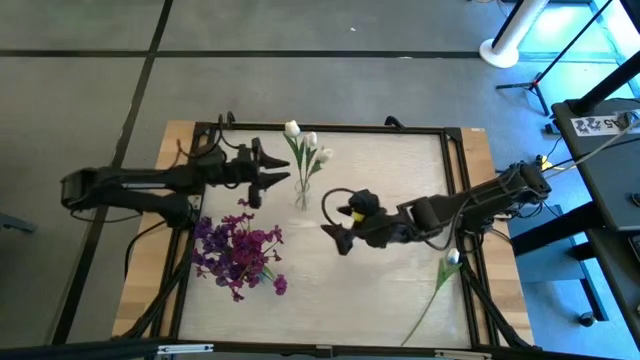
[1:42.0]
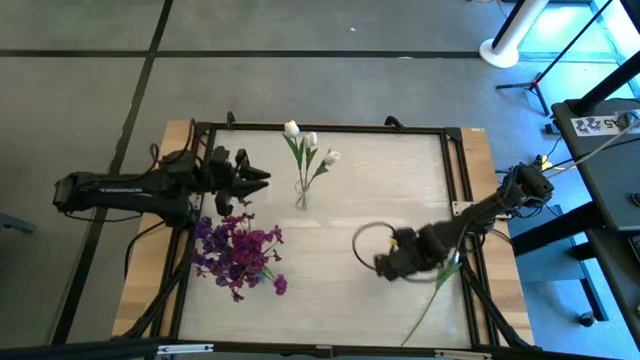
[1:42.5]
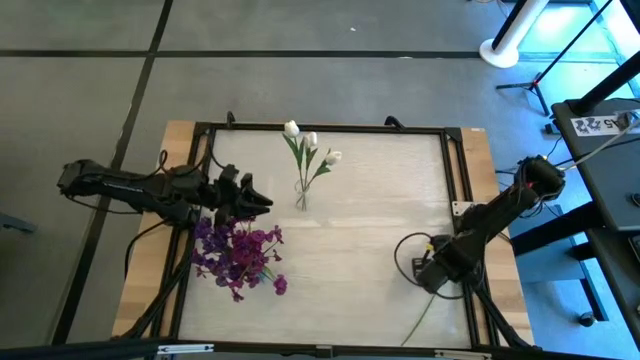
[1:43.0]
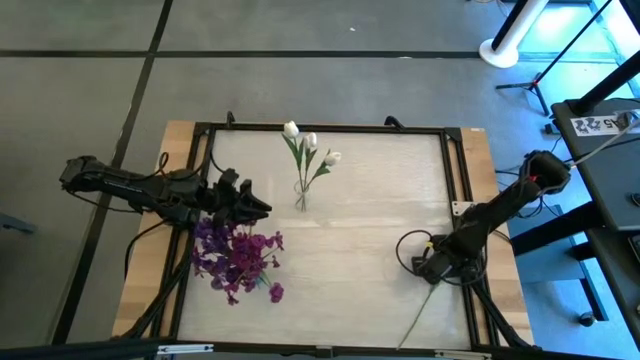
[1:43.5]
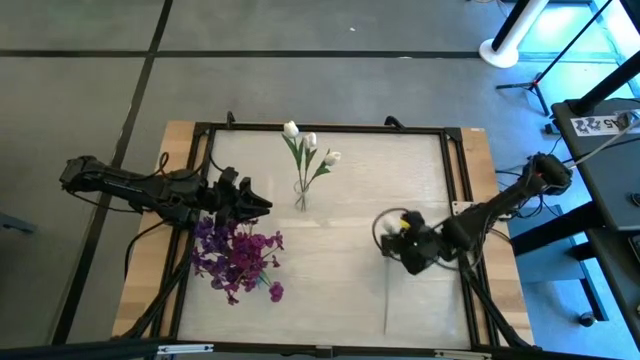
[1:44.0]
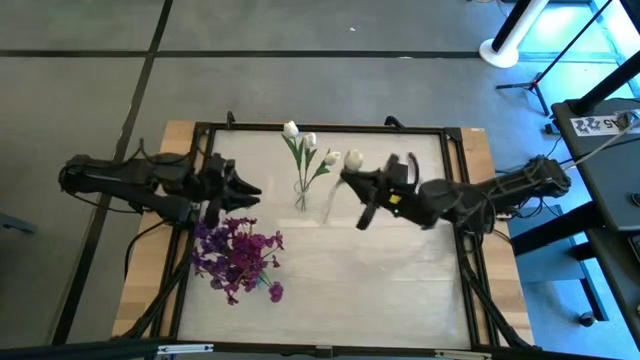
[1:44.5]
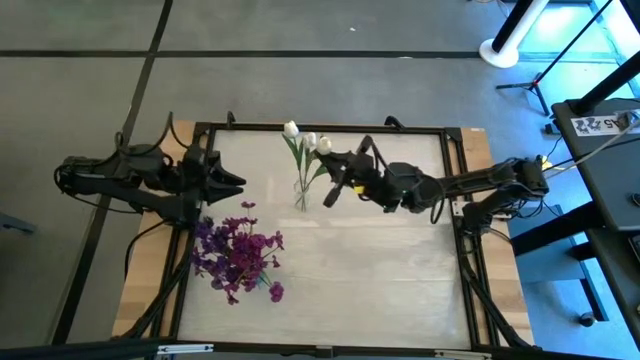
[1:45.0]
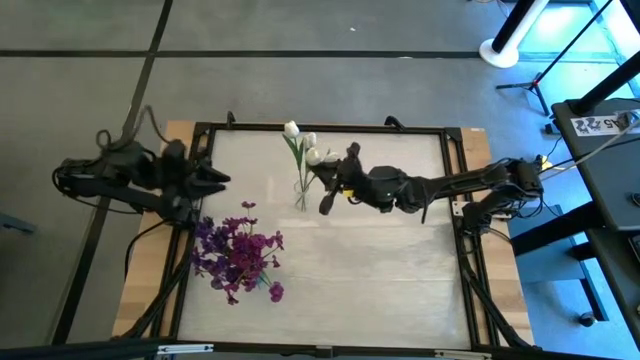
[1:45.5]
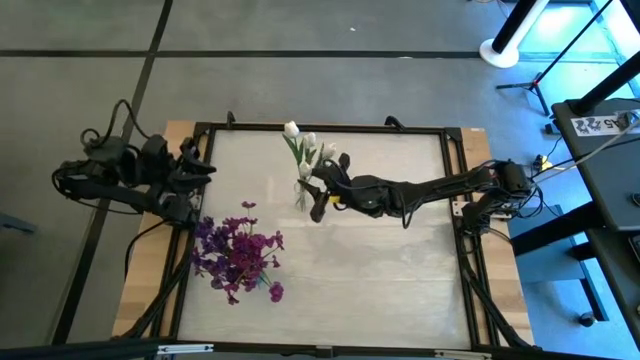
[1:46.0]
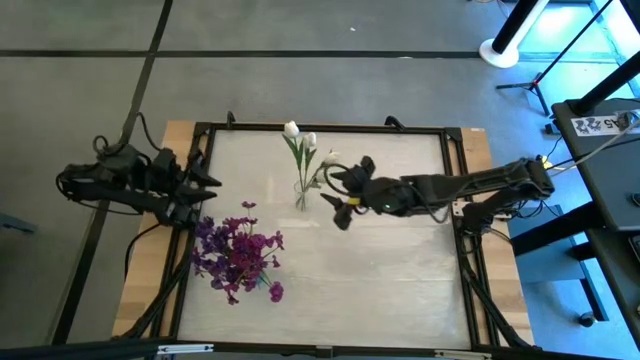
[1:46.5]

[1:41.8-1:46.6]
Task: Sort flowers into vase by color
Put the white flower into the transparent vase

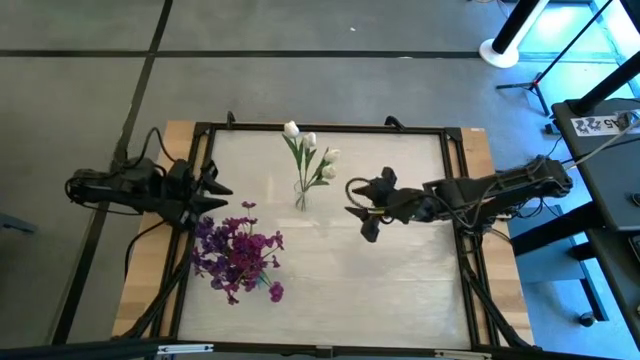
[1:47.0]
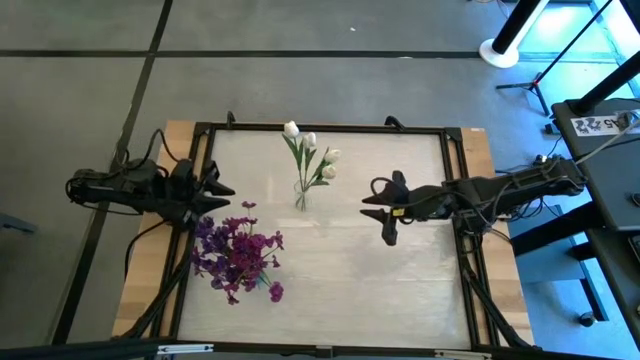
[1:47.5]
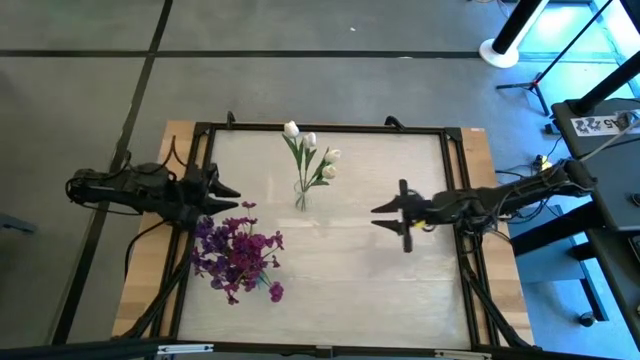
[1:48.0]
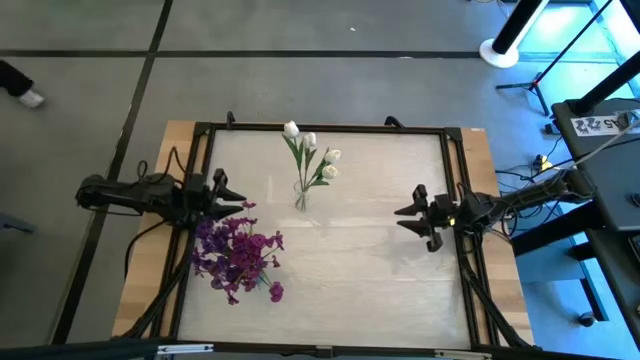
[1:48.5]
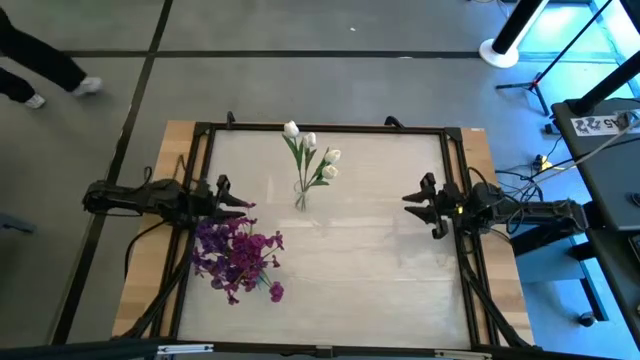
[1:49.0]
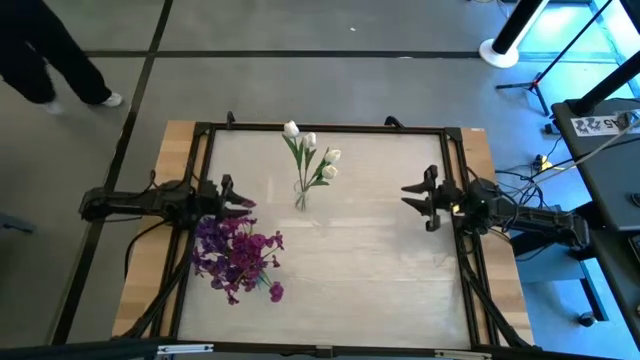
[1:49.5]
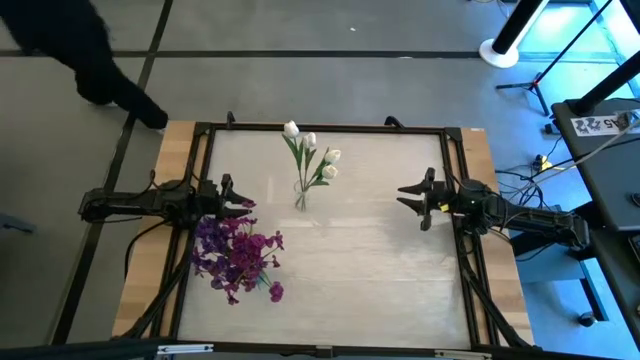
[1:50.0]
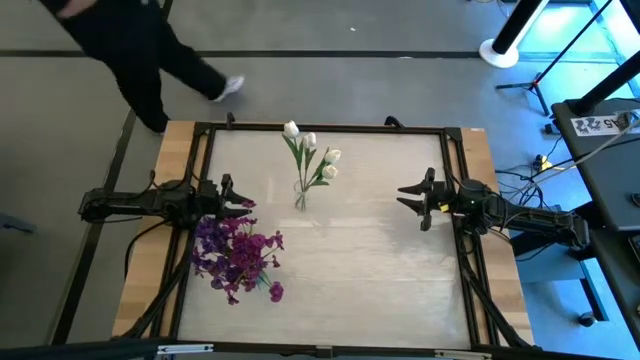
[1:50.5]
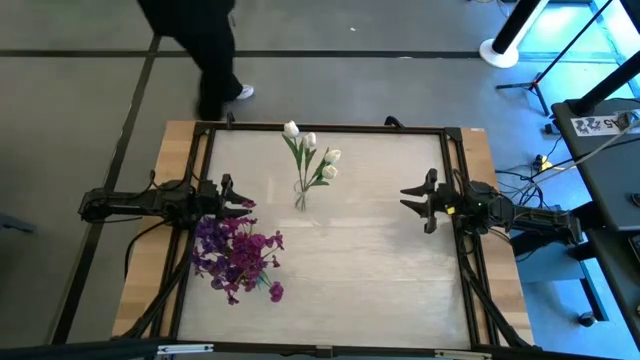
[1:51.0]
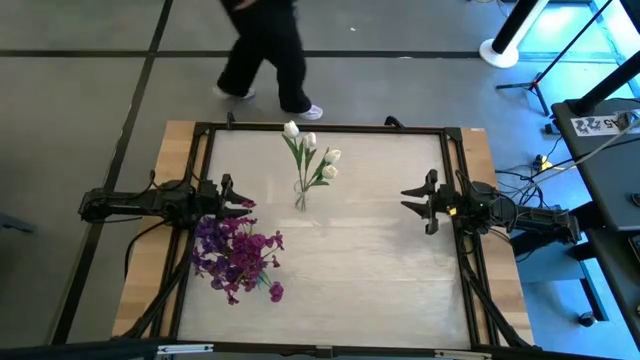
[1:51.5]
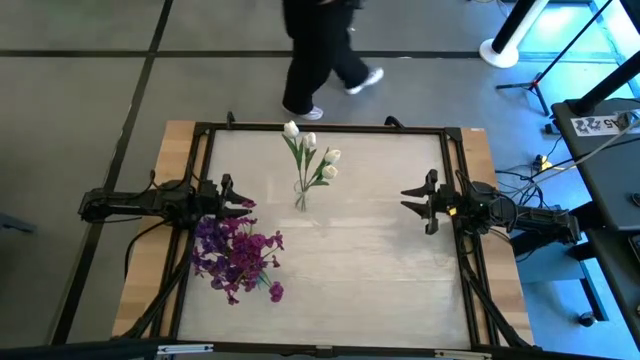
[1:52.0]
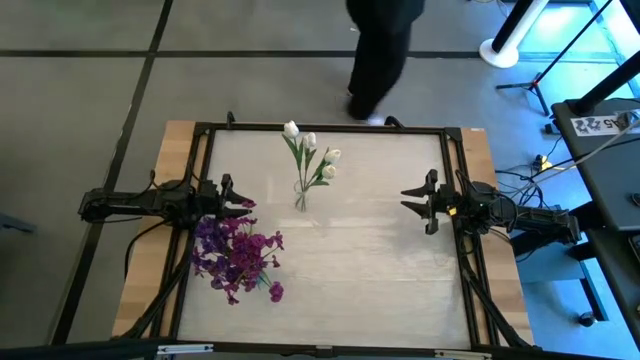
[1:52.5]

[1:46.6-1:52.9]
Return to Home Position

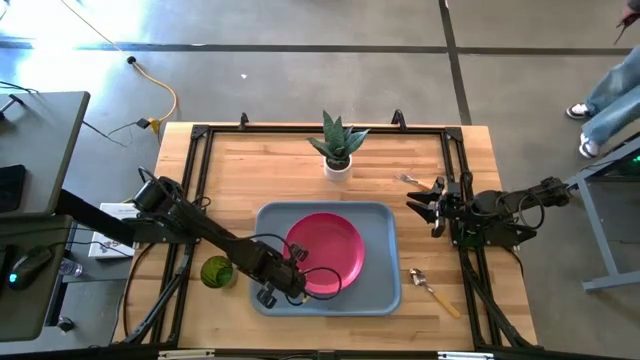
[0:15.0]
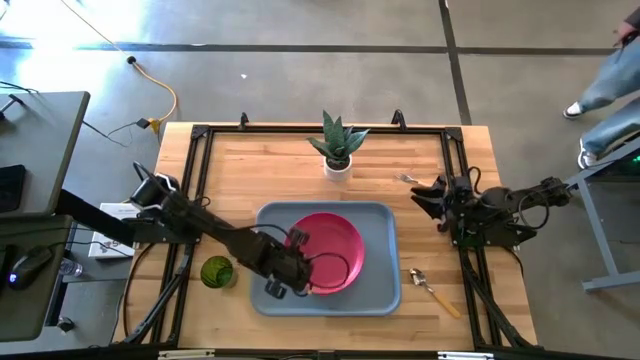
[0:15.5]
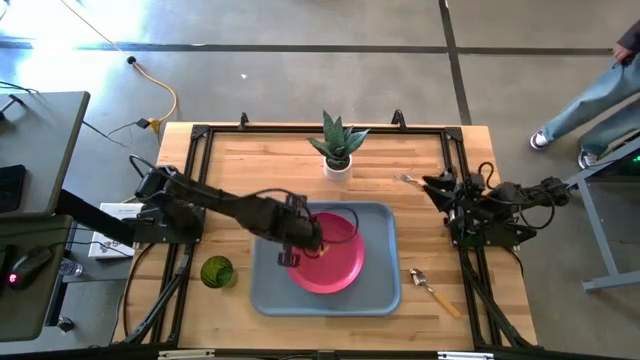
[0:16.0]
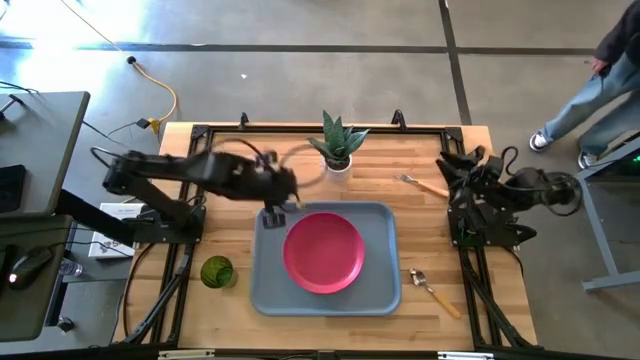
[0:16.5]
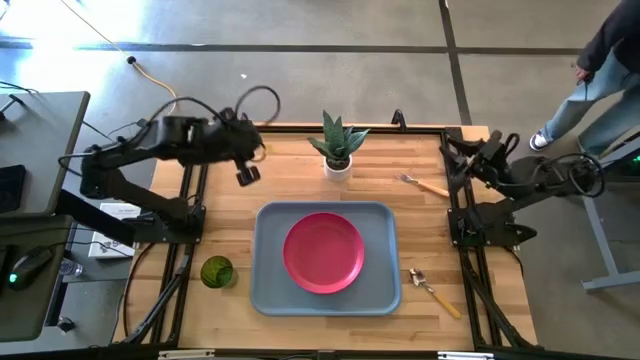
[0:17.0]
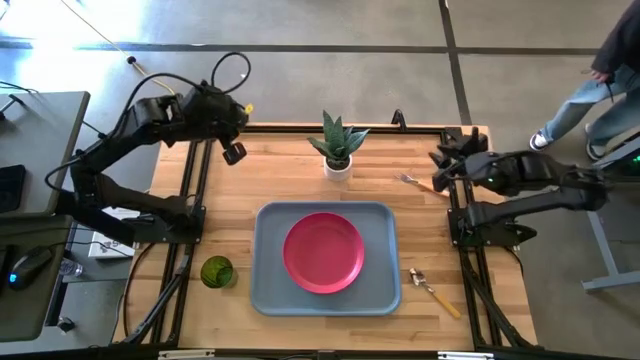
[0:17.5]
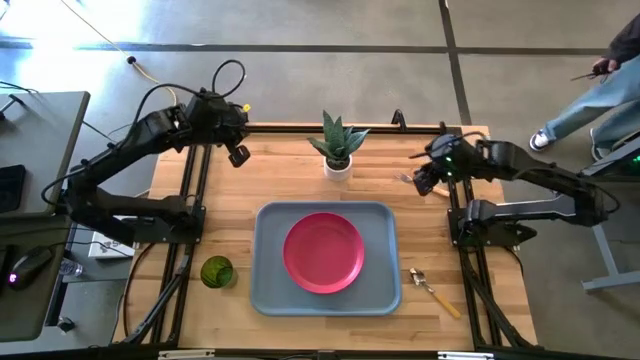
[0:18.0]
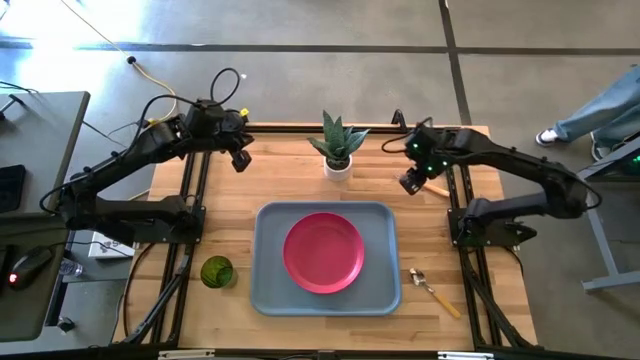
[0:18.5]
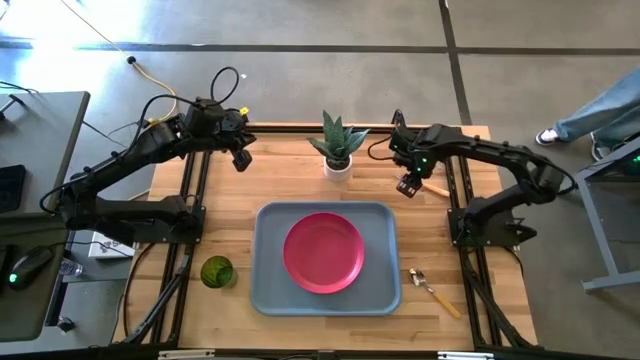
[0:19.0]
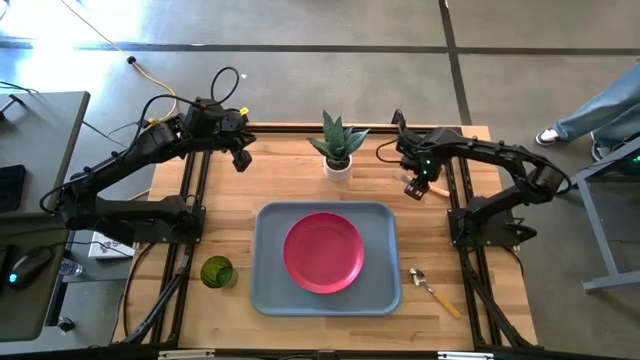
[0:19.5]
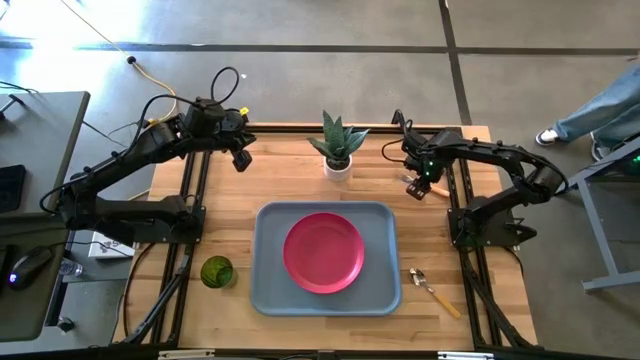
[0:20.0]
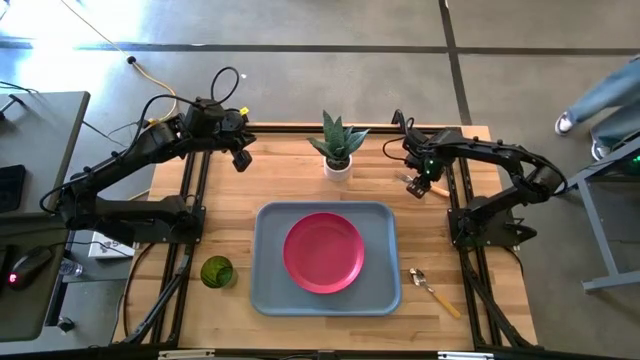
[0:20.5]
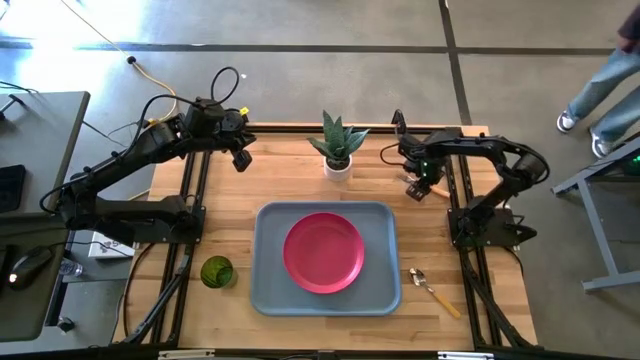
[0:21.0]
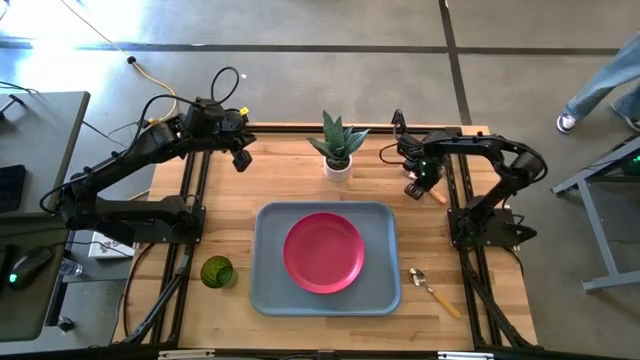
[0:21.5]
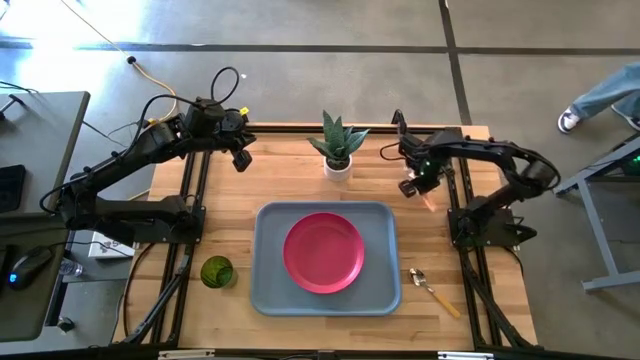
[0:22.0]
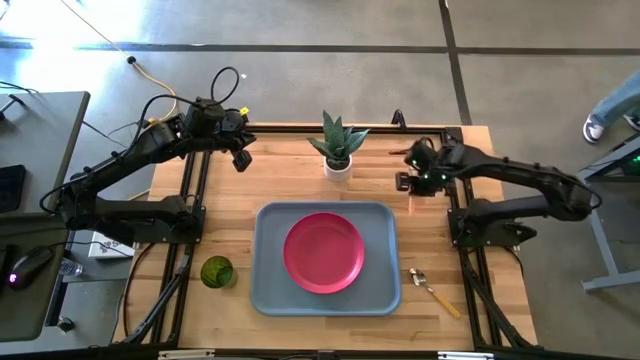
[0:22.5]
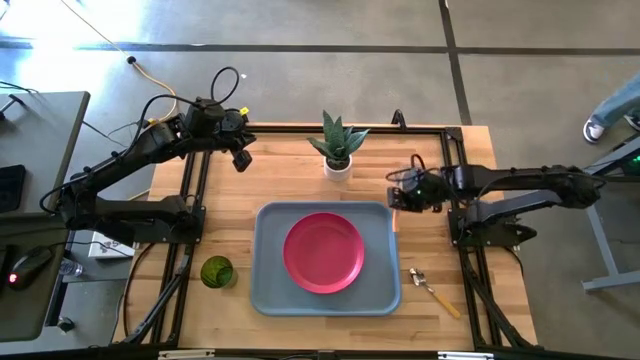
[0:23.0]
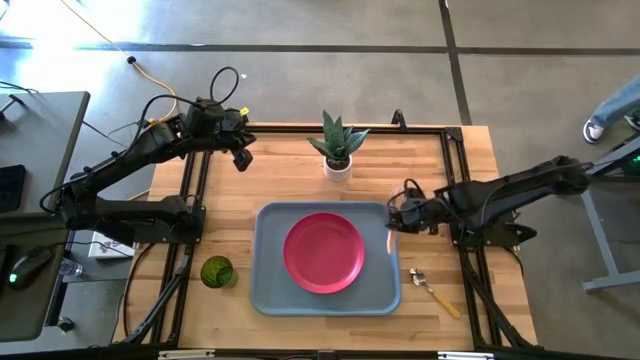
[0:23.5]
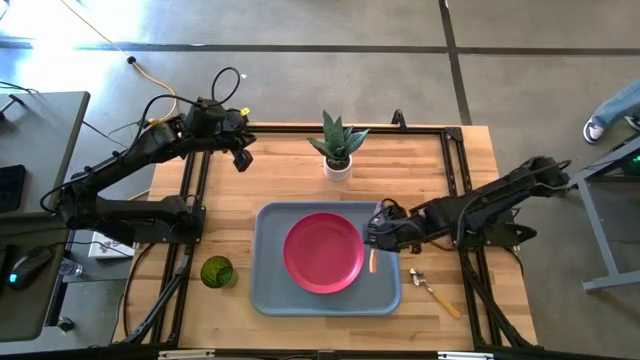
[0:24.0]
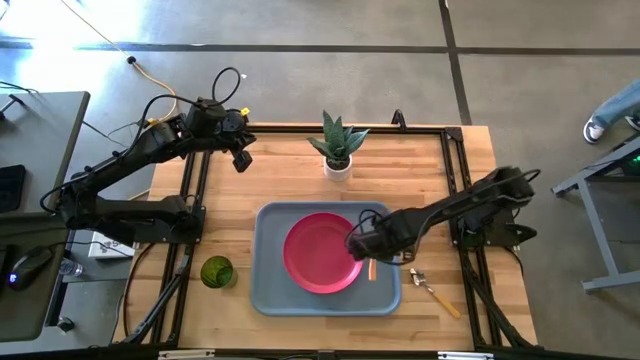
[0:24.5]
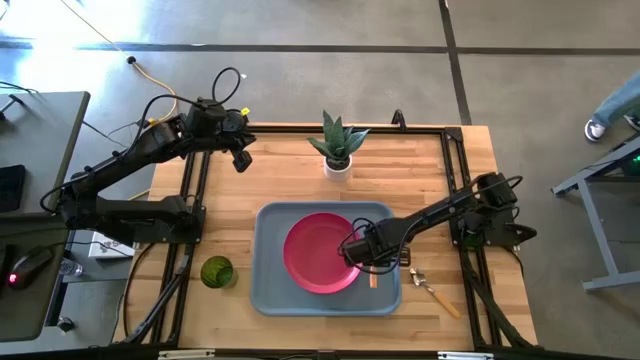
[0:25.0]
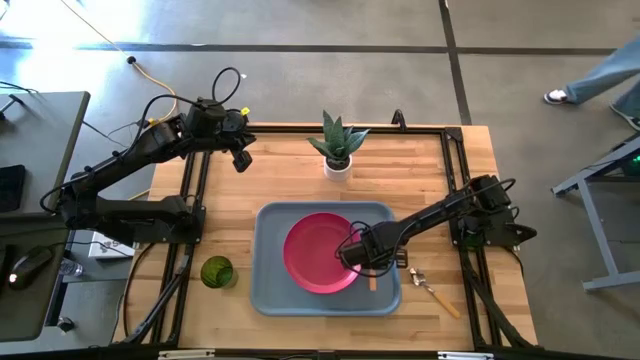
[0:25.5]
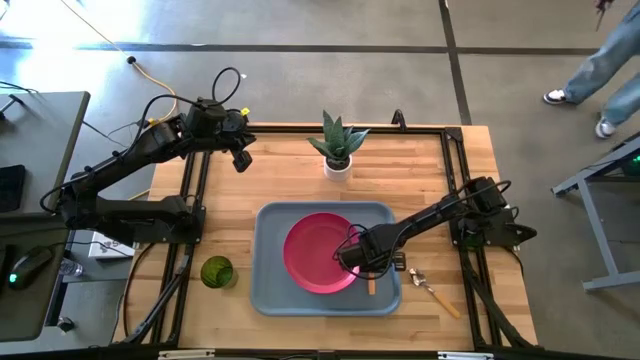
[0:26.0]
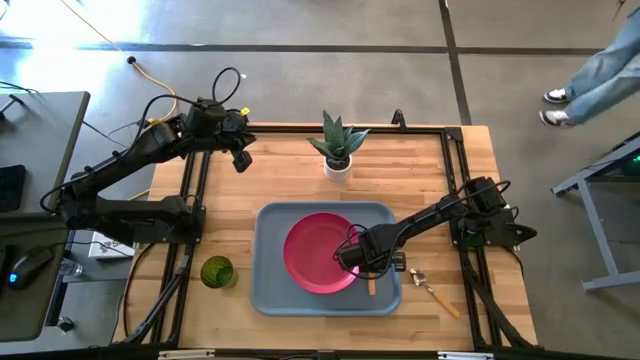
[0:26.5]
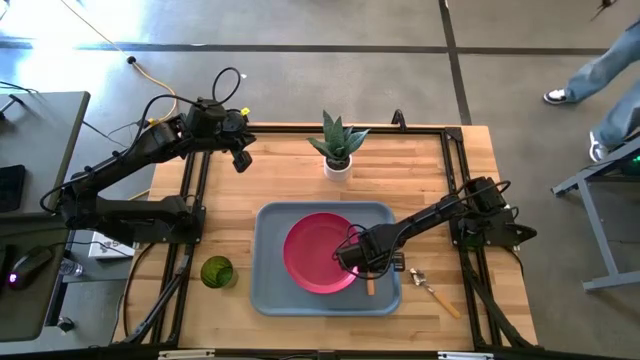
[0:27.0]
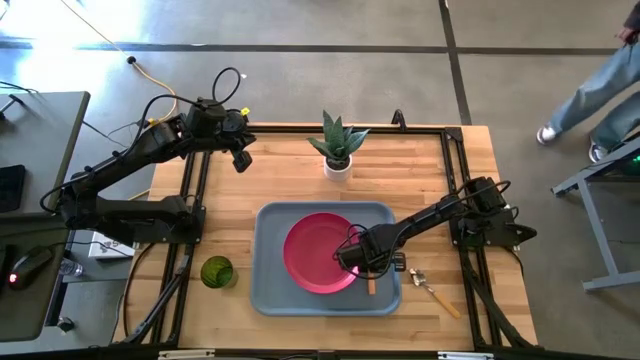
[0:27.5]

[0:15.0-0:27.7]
Task: Pick and place plate/cup/fork/spoon on tray
Put the orange fork on the light blue tray beside the pink plate
